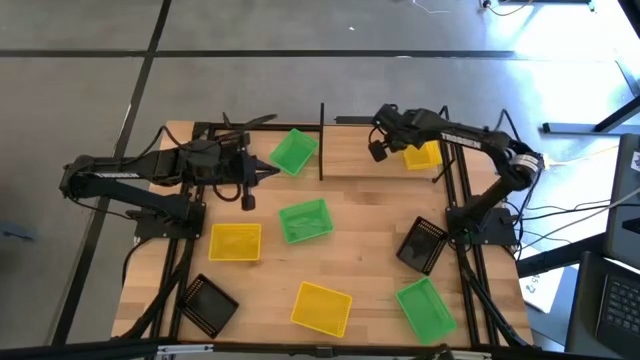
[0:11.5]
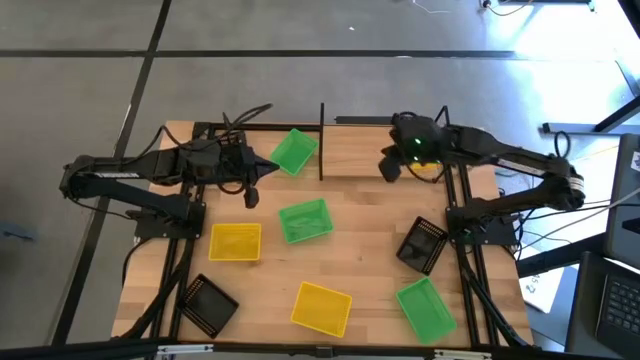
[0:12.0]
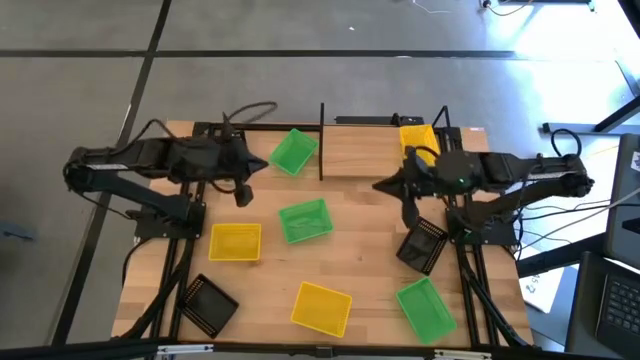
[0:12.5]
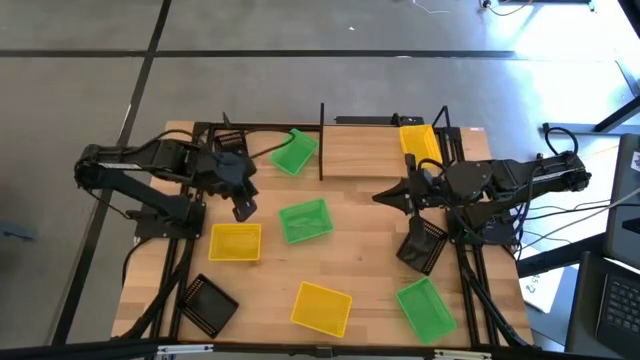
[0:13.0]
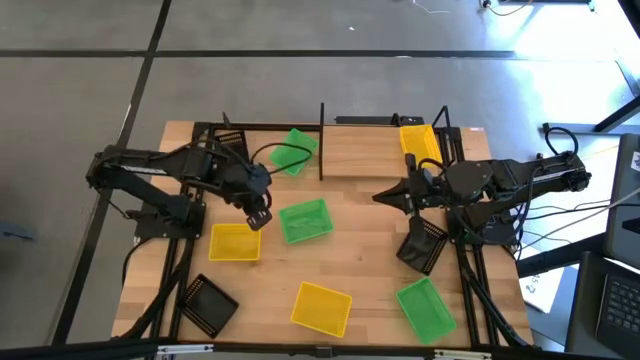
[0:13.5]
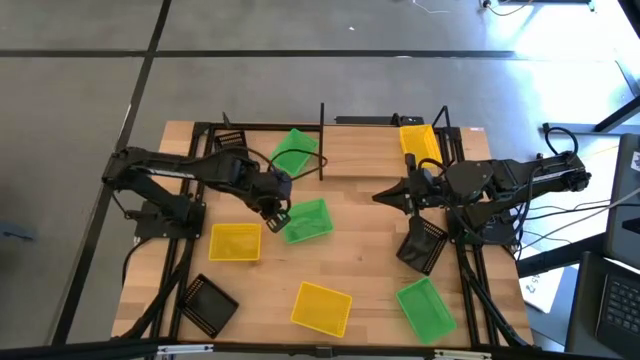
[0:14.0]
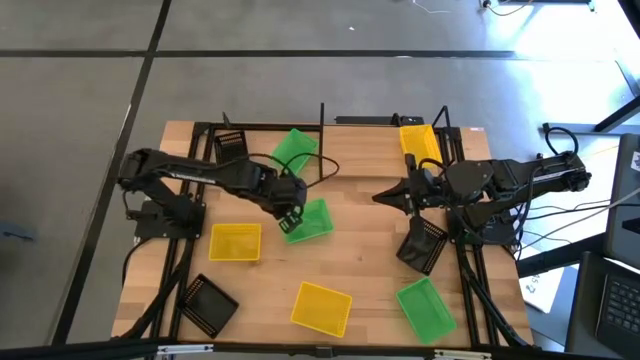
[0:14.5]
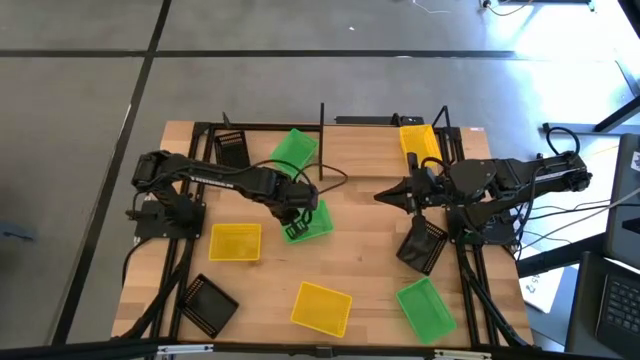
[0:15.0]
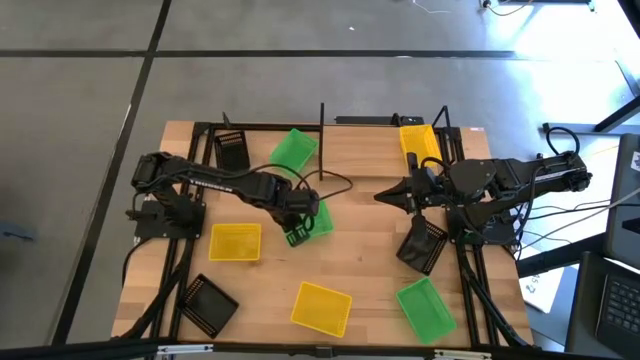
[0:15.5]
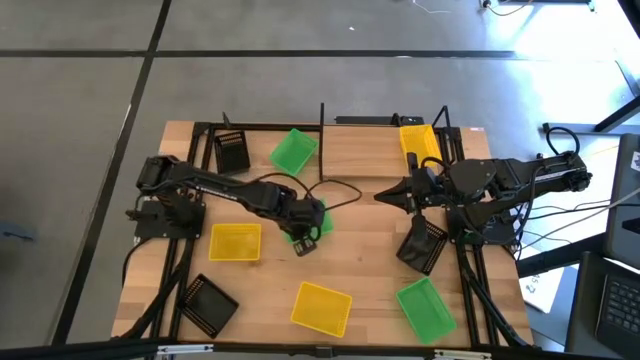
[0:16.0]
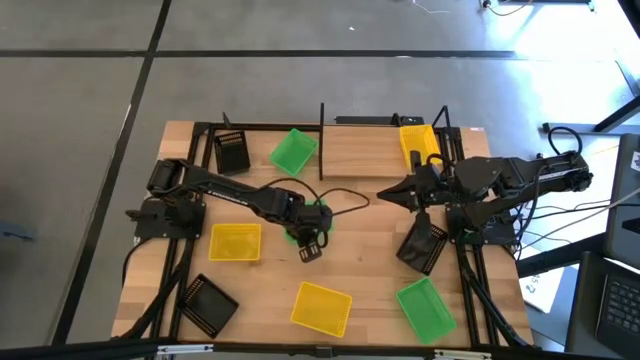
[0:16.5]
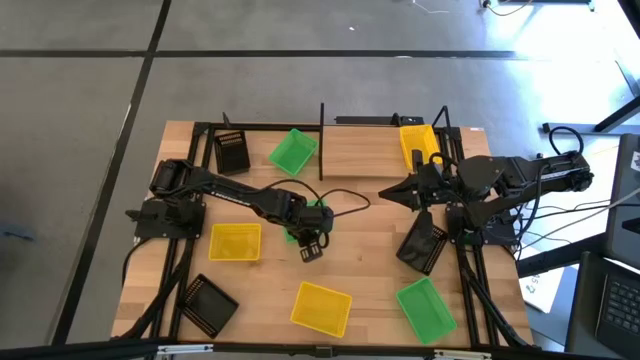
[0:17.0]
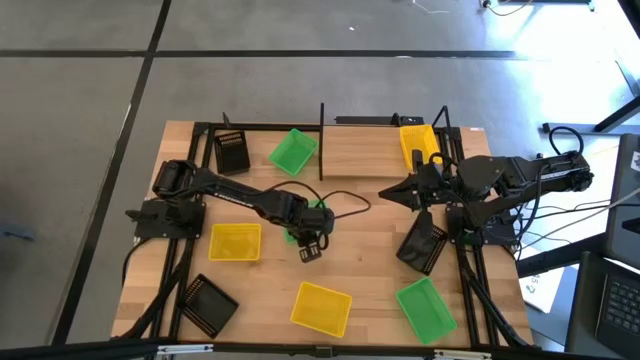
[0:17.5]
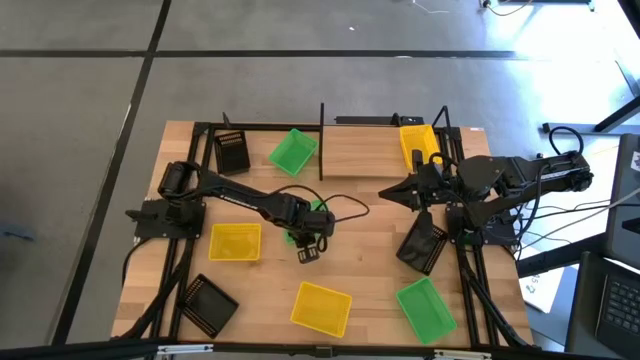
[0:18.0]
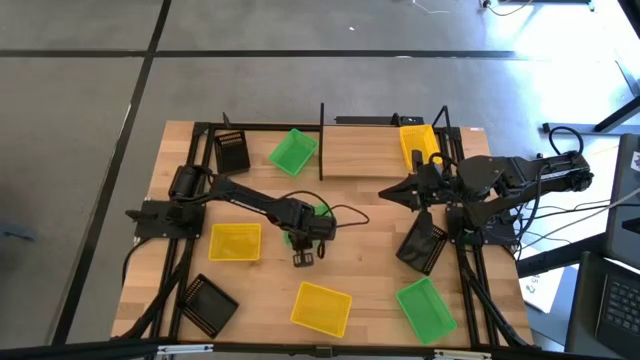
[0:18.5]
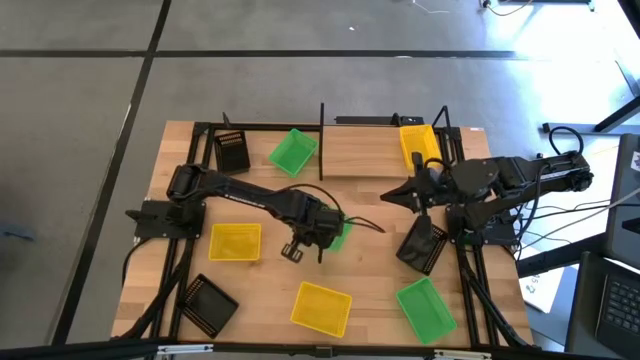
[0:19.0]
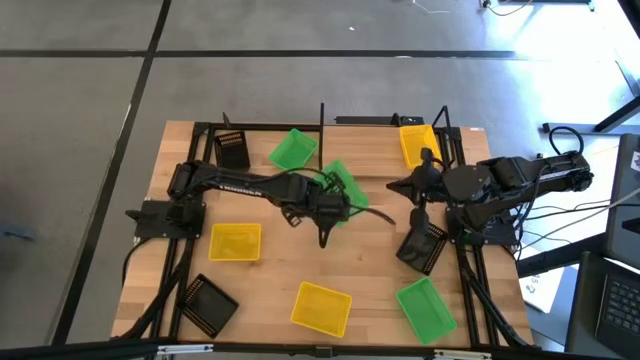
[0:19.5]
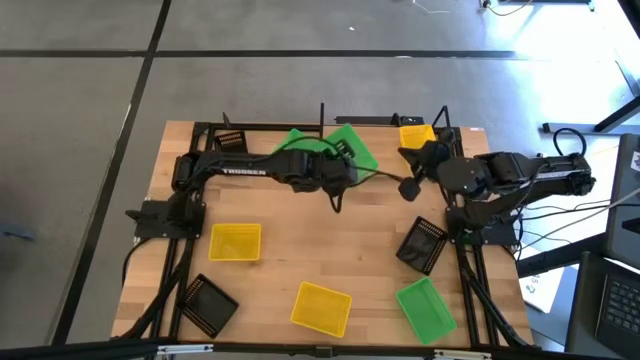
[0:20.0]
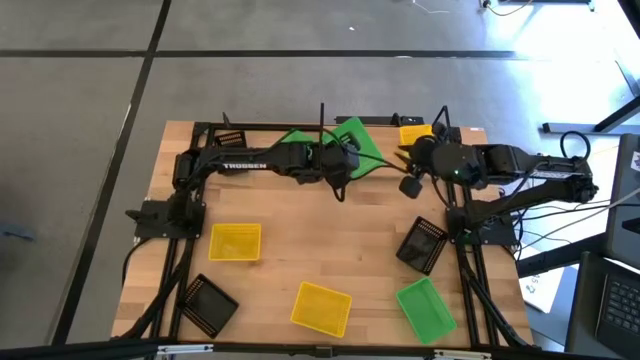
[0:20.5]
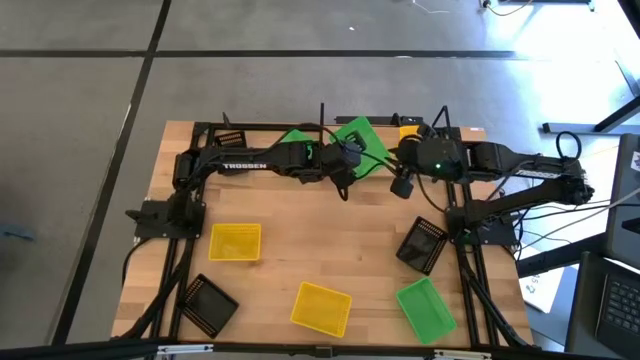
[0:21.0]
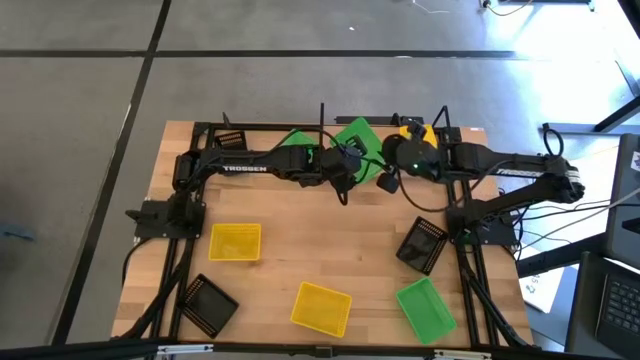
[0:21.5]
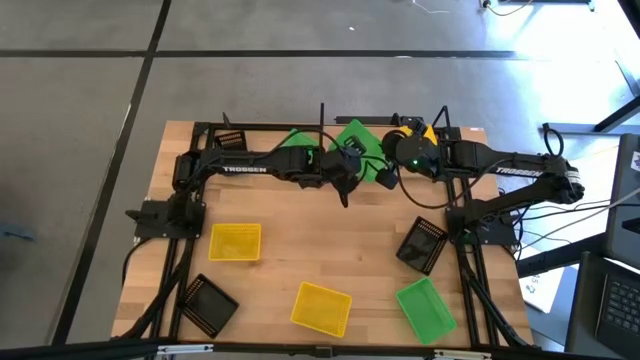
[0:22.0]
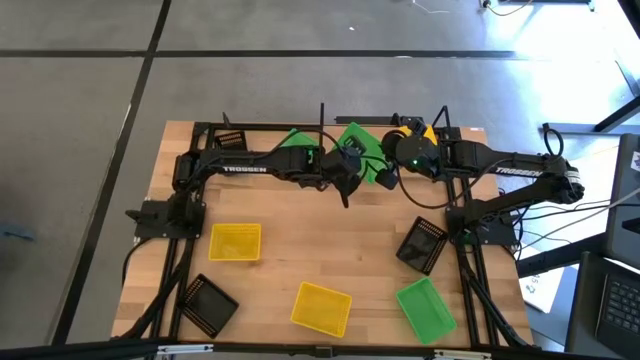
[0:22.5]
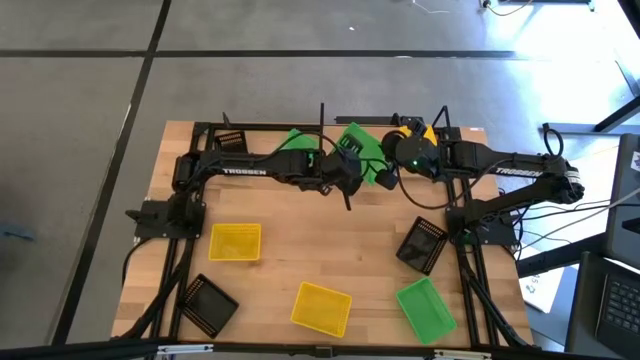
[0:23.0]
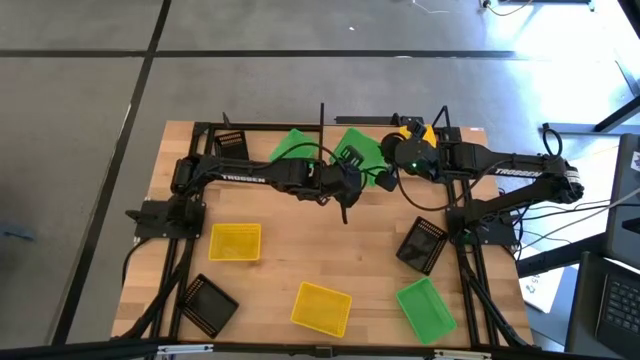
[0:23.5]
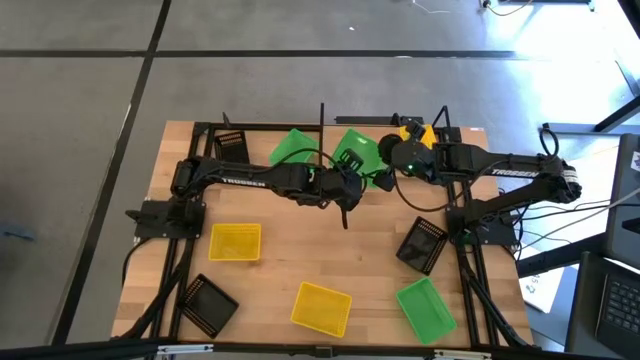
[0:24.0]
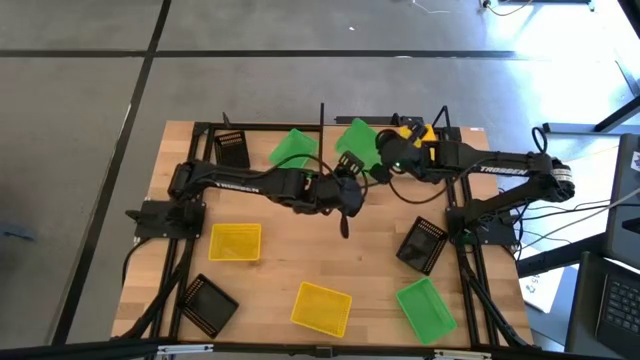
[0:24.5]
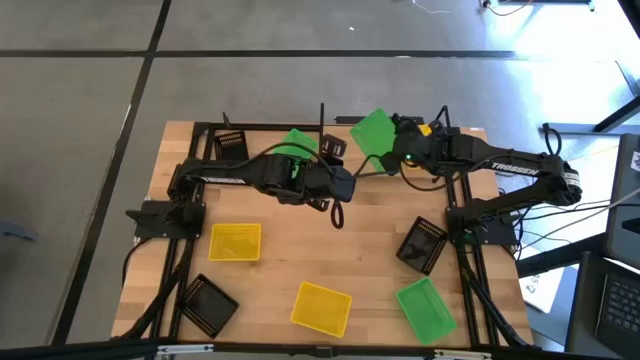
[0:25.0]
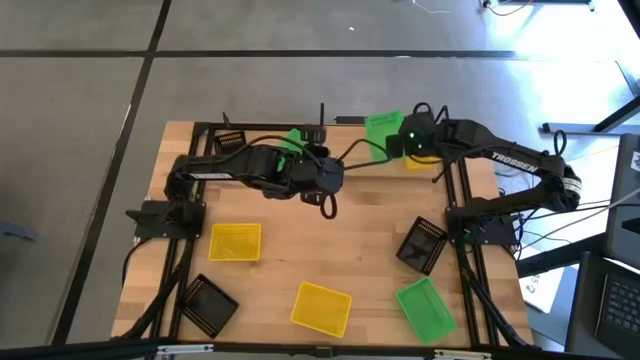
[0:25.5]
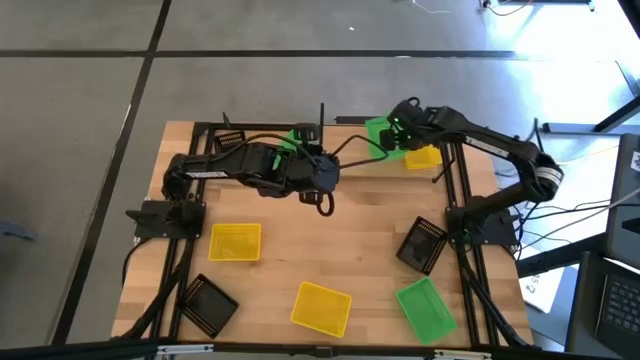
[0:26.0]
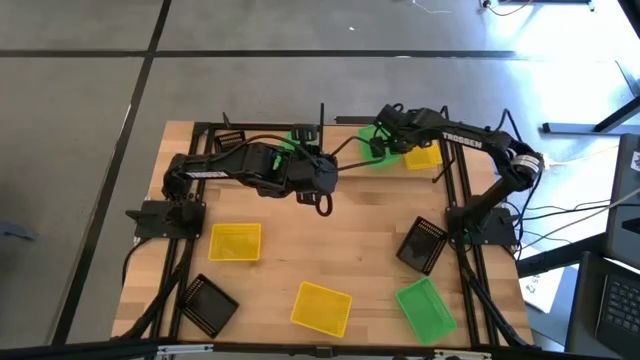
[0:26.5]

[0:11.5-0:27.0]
Task: Stack baskets on shelf by color
Put the bottom green basket on the shelf
